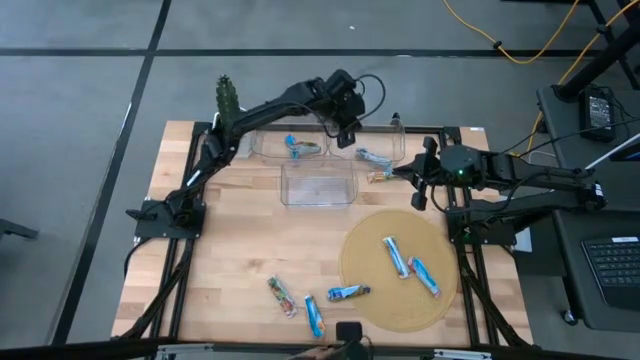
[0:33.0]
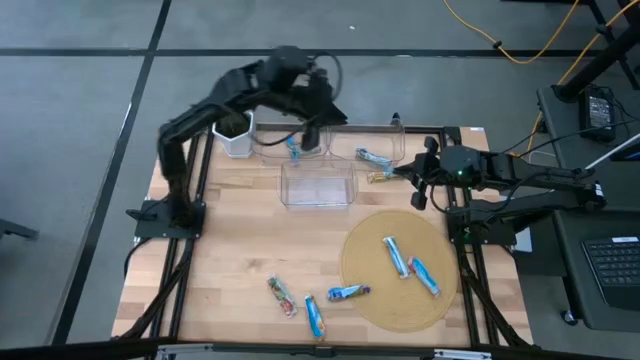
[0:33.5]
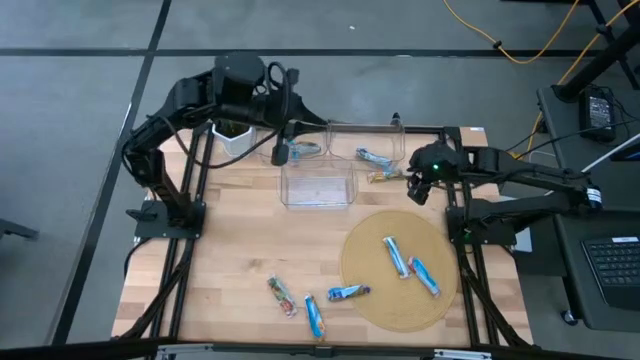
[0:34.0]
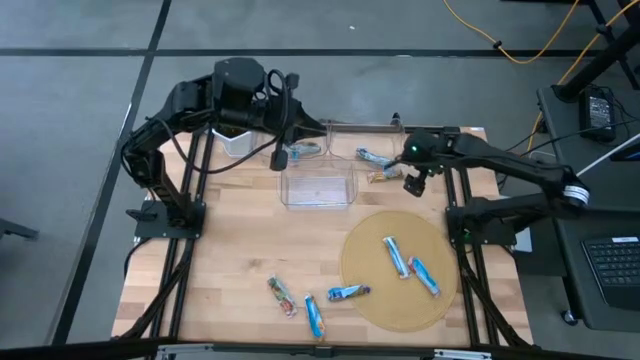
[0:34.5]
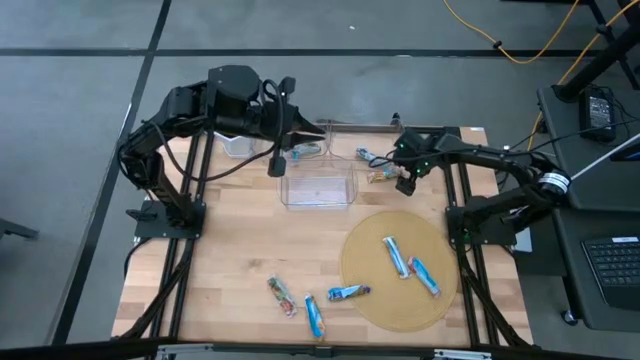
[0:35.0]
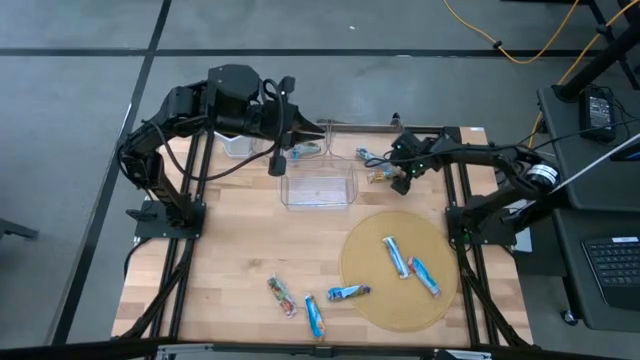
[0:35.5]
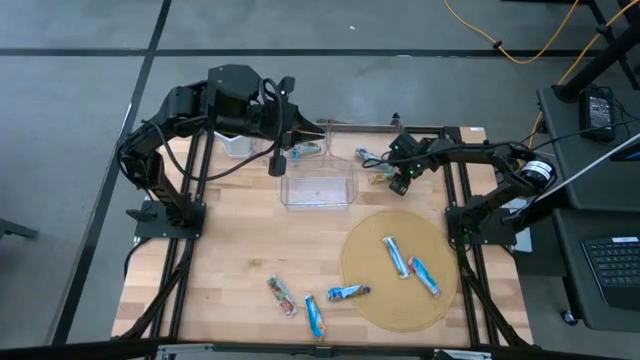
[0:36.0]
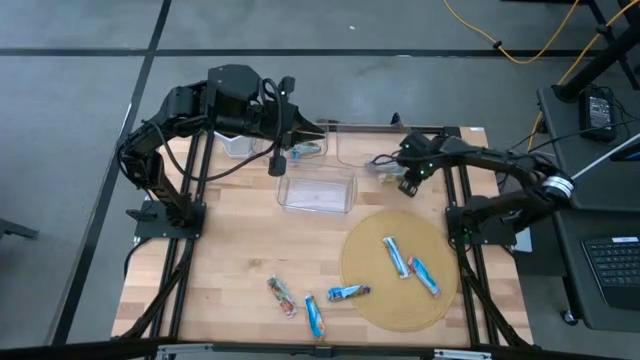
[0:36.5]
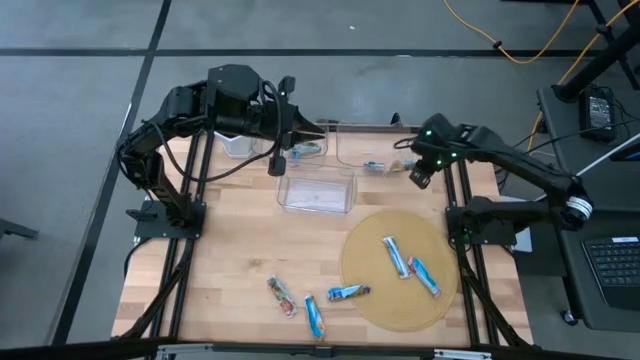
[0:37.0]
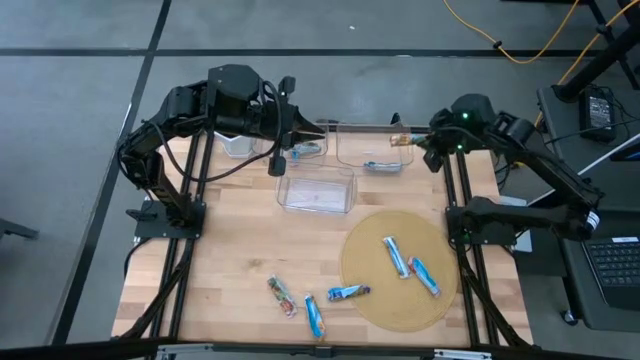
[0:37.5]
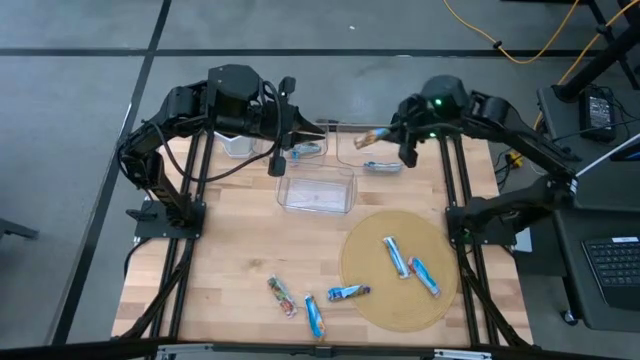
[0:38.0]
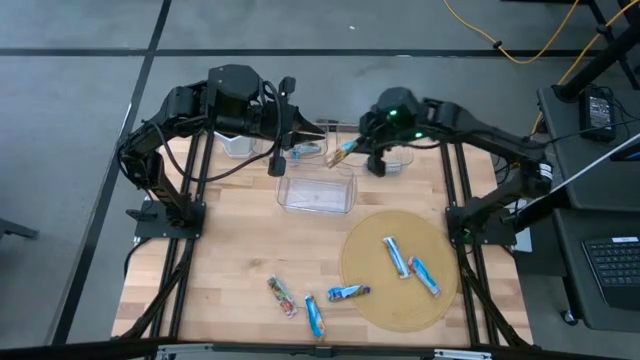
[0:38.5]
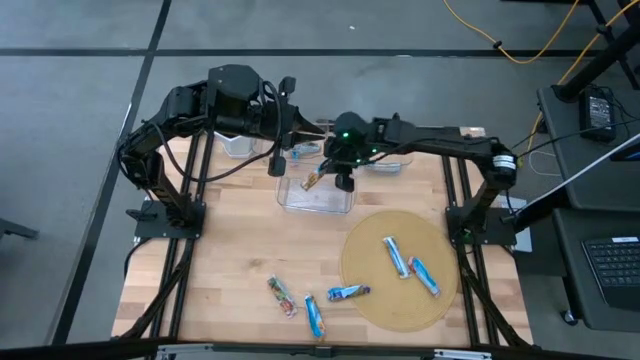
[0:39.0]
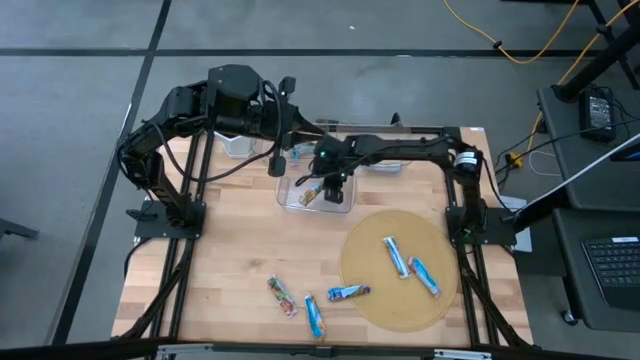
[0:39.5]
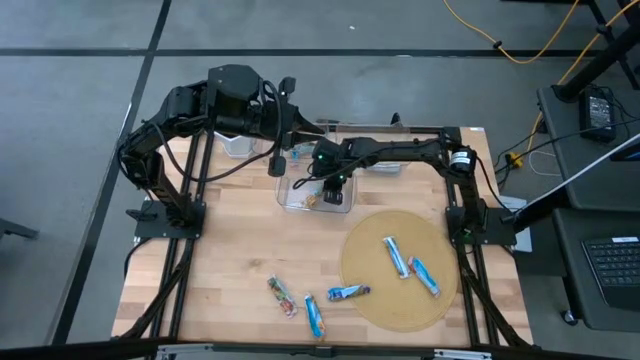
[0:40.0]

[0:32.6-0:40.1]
Task: Pick and place Granola Bars by type
Put the yellow granola bar into the bottom transparent bin

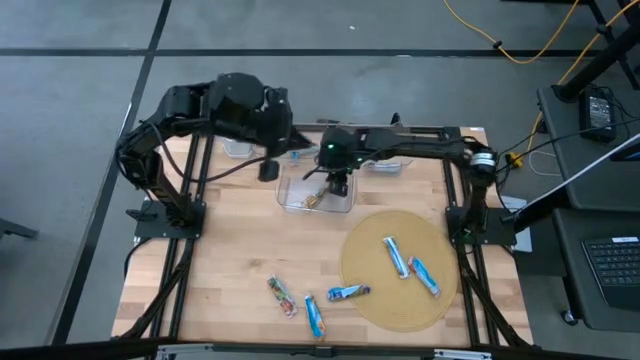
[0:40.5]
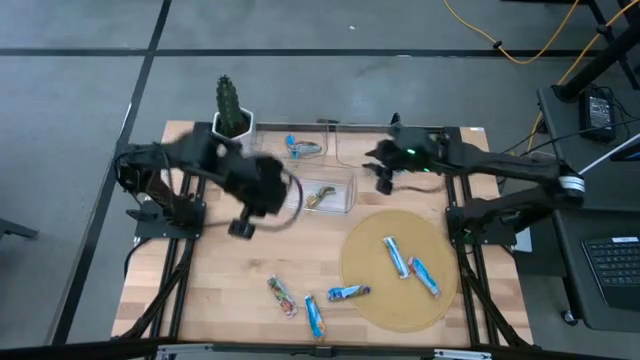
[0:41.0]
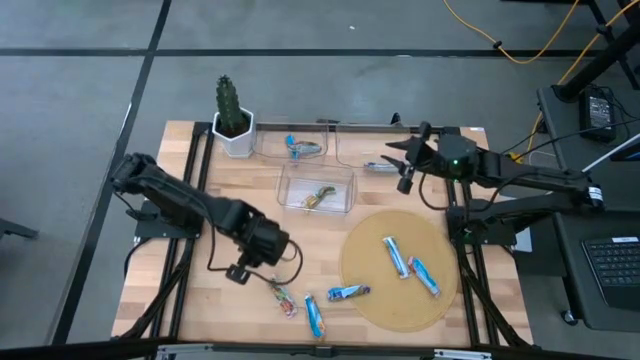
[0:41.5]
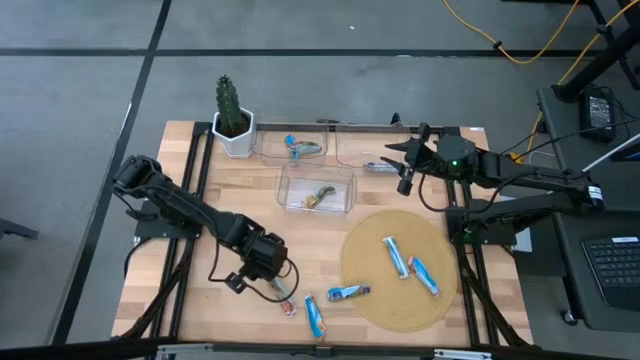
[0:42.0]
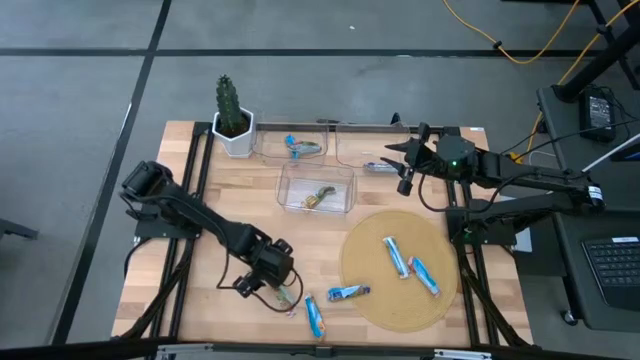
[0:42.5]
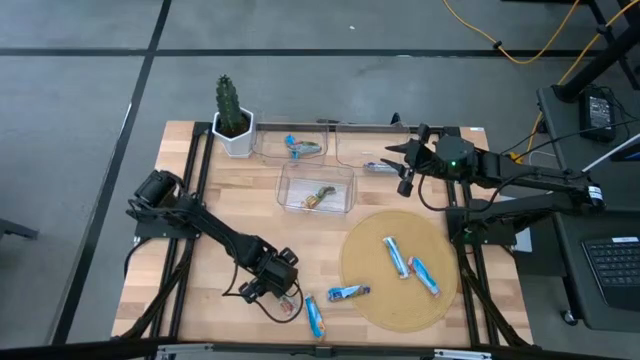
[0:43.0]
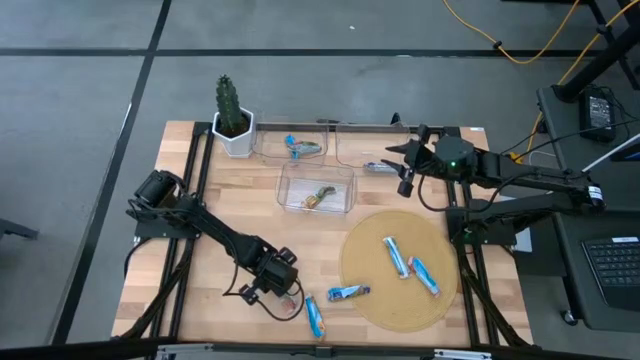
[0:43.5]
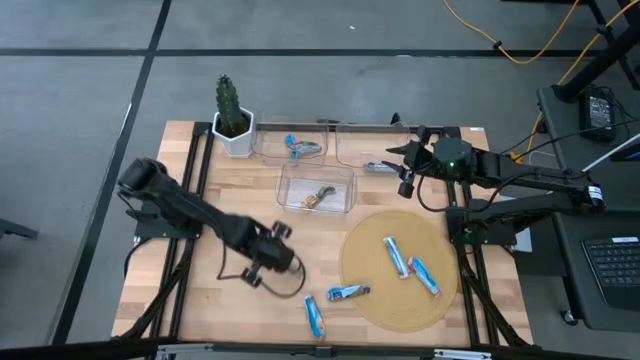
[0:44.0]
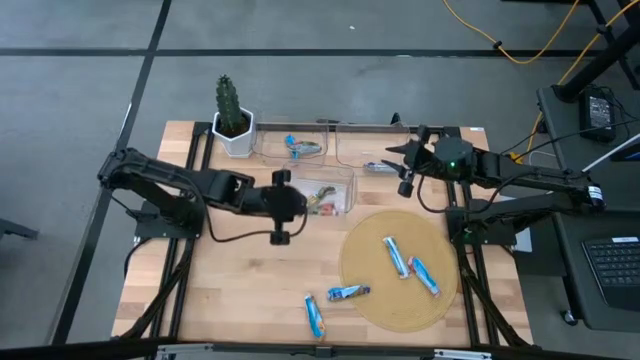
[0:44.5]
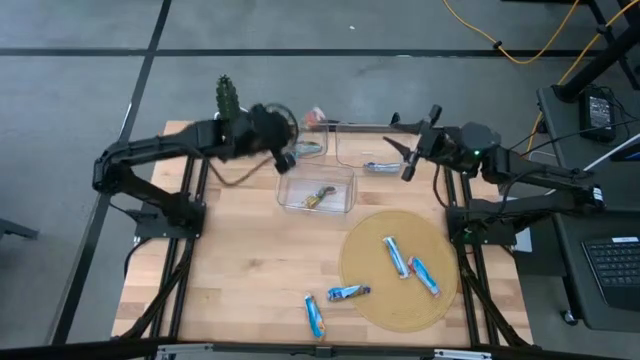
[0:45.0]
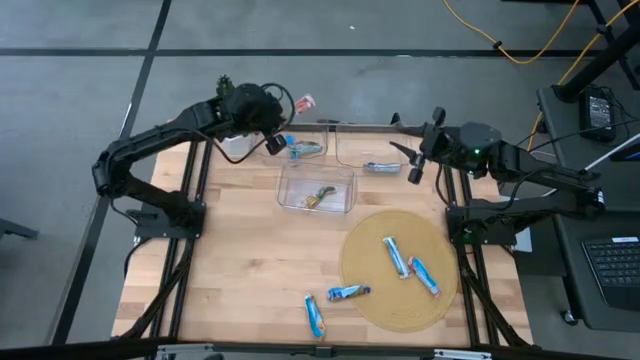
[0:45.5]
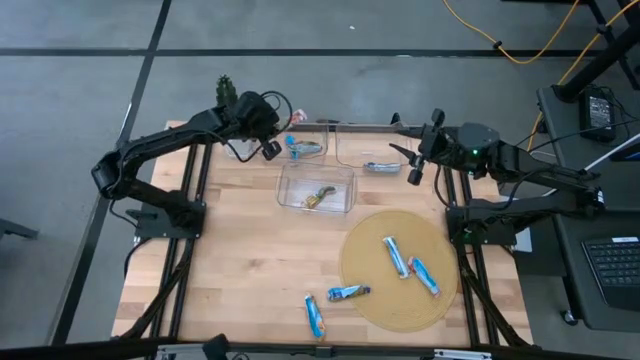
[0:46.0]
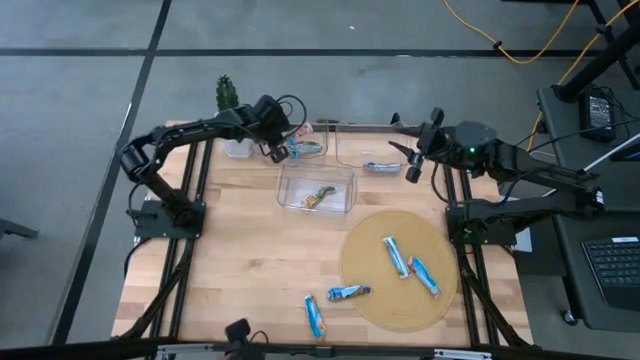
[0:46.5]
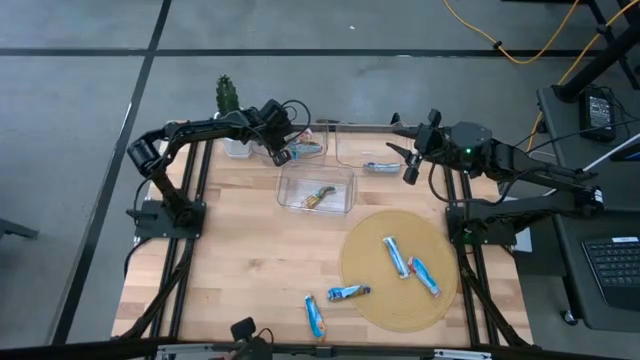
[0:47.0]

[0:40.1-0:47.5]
Put the red granola bar into the top left transparent bin

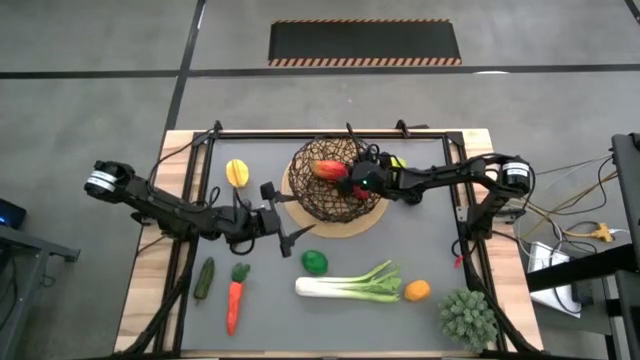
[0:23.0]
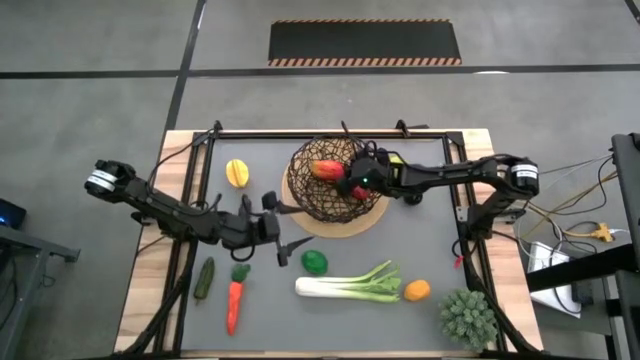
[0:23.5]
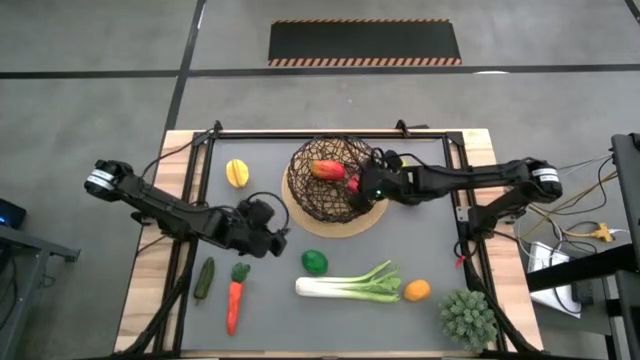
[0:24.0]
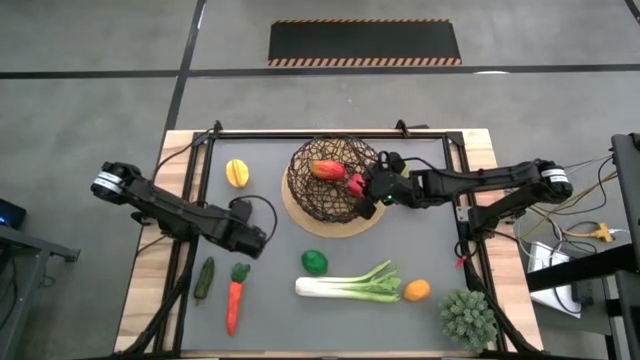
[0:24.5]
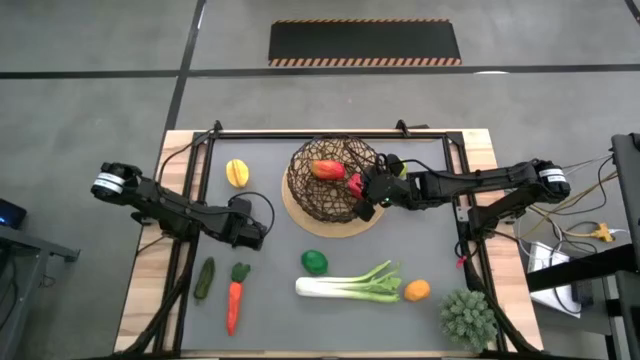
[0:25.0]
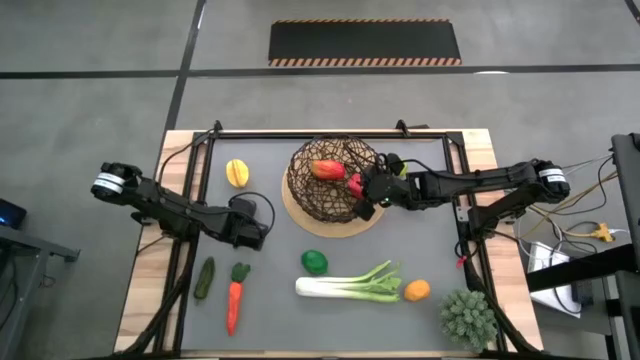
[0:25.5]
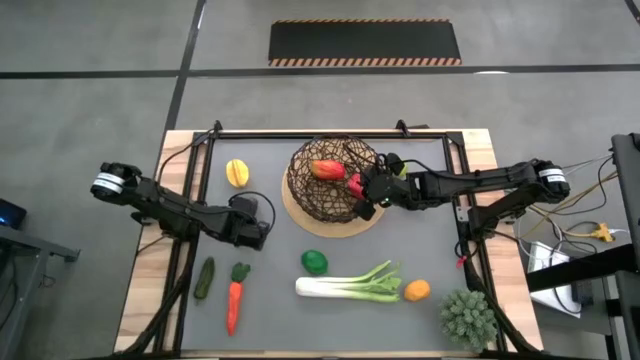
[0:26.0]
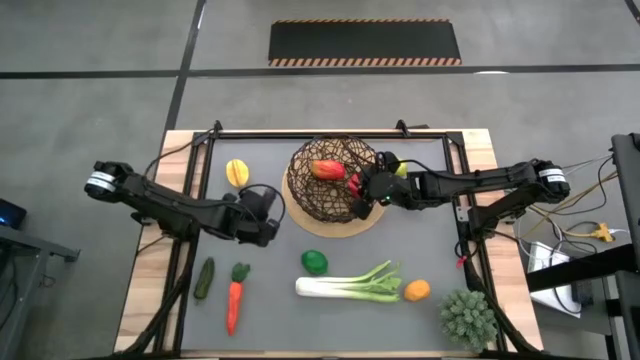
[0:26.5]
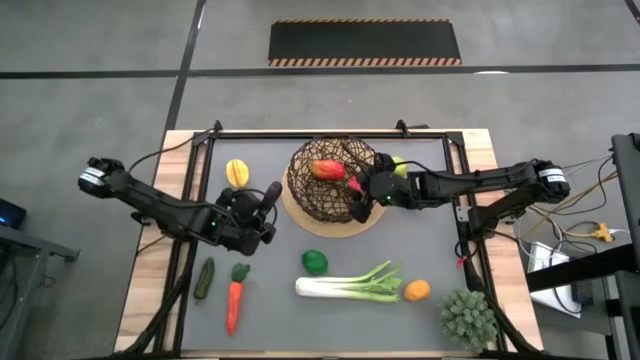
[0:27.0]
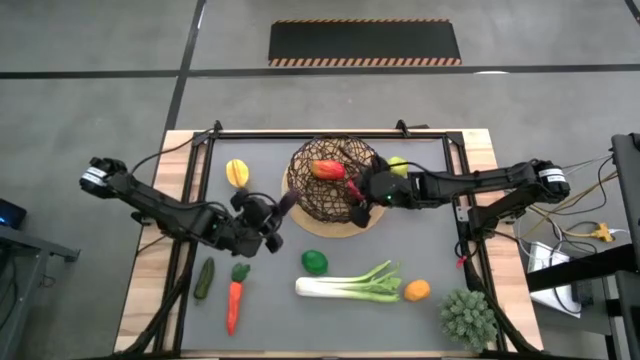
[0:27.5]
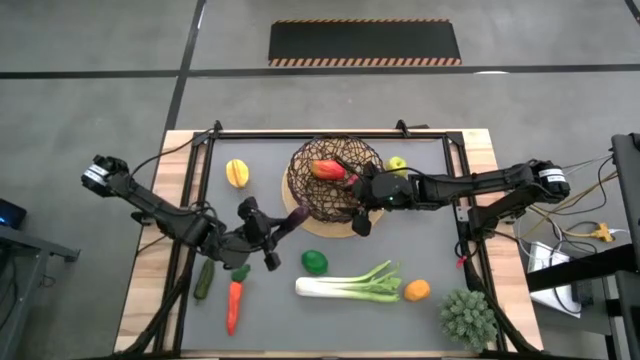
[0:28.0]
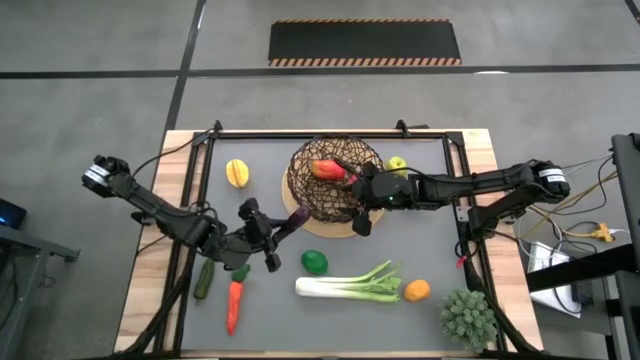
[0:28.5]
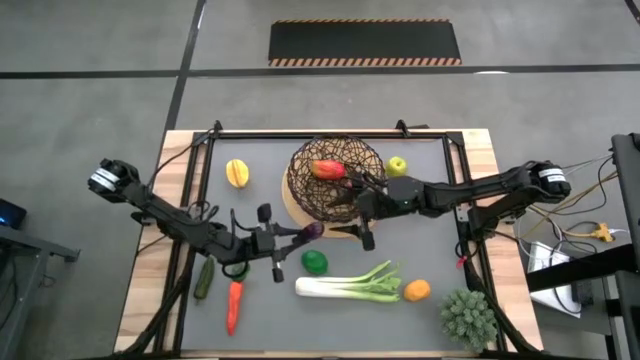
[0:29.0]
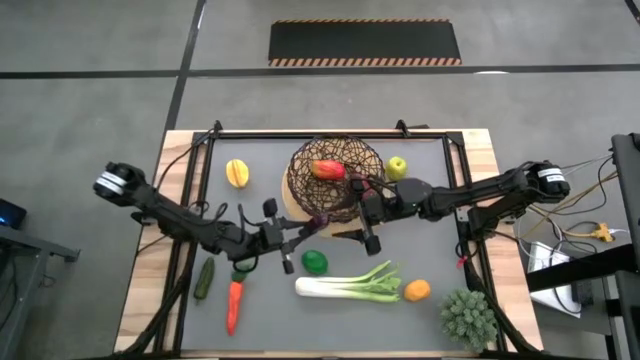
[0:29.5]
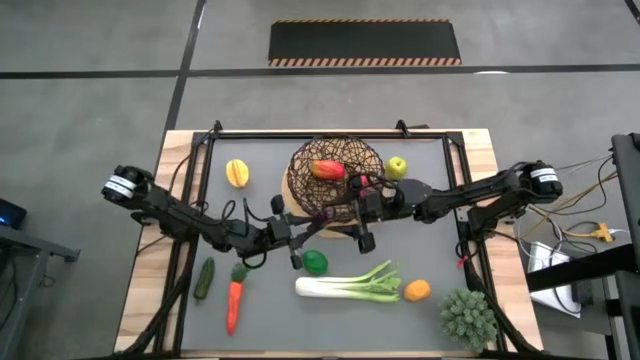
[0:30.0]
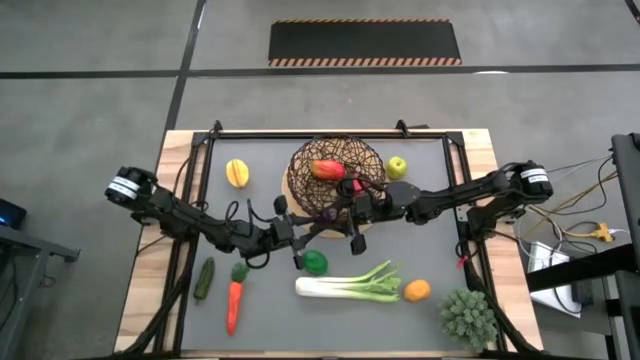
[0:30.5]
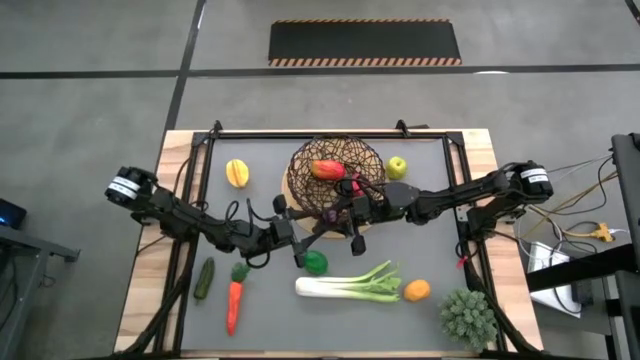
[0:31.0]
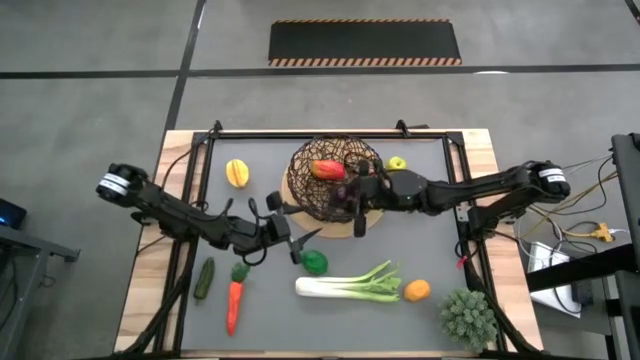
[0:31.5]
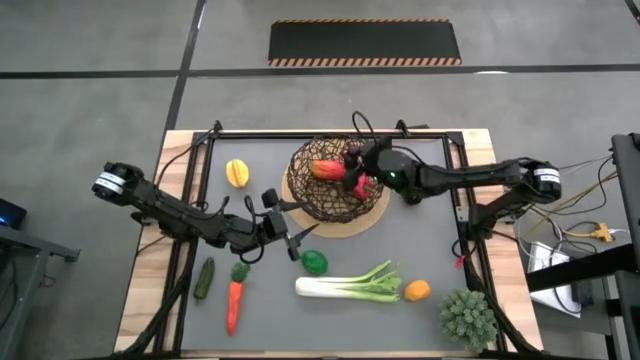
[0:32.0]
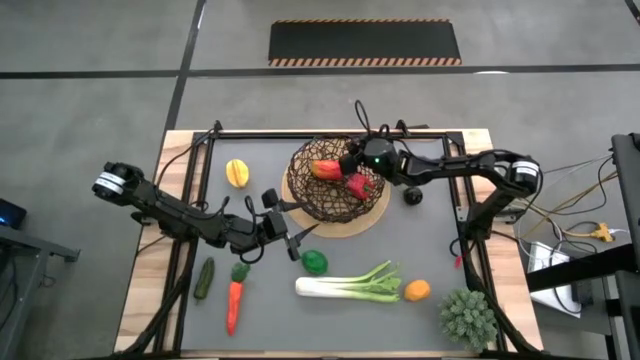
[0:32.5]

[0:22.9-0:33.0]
Task: Build produce basket
Put the eggplant into the basket
